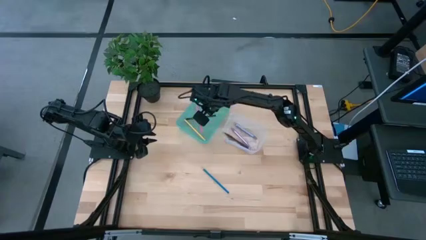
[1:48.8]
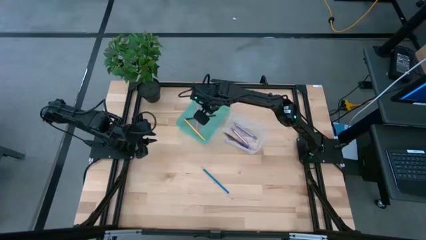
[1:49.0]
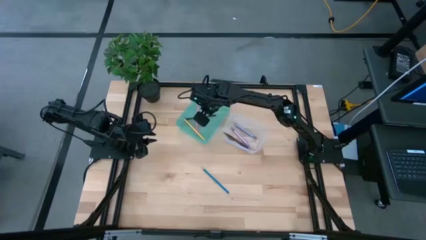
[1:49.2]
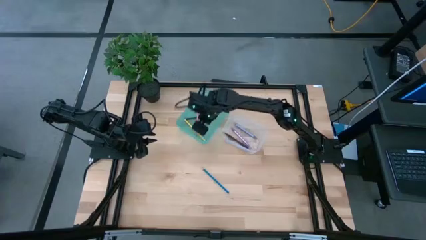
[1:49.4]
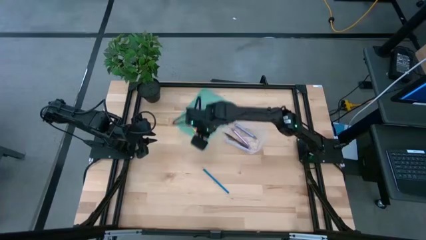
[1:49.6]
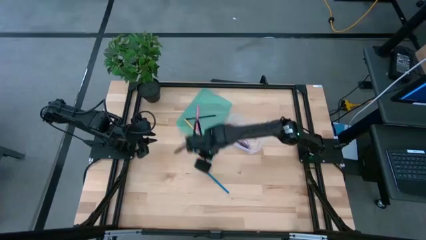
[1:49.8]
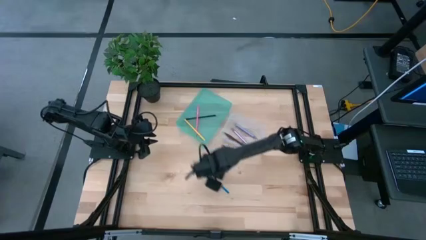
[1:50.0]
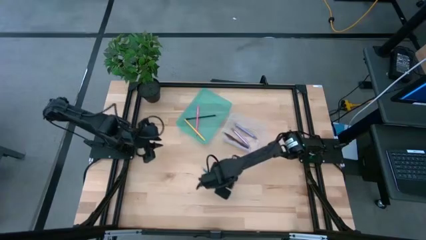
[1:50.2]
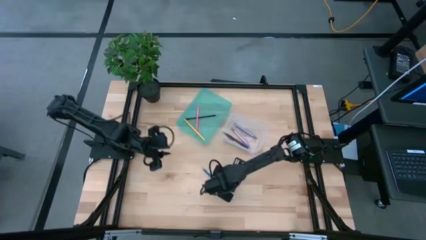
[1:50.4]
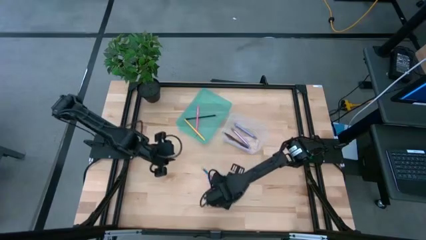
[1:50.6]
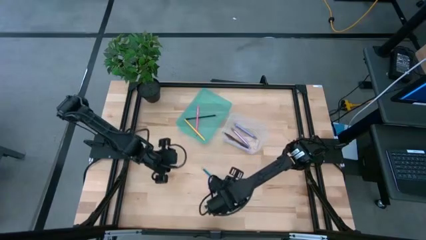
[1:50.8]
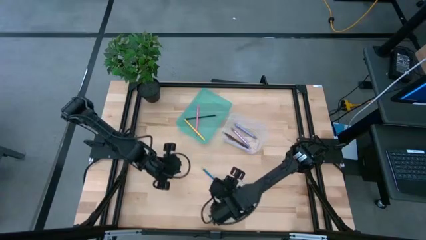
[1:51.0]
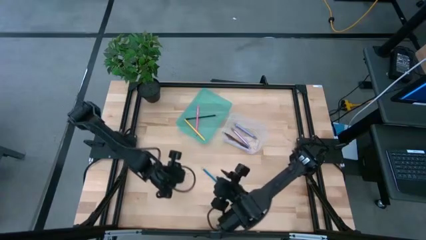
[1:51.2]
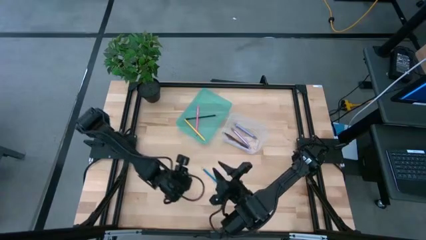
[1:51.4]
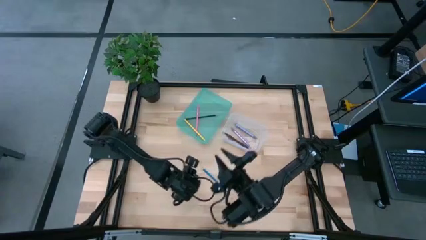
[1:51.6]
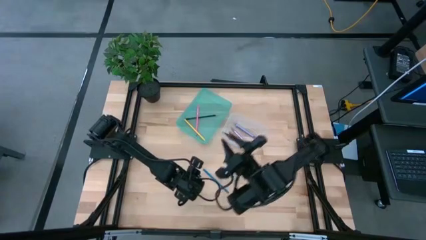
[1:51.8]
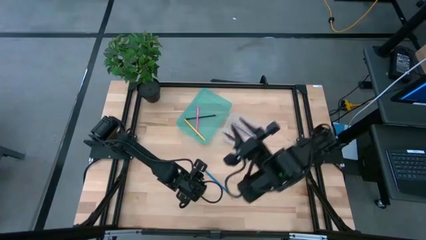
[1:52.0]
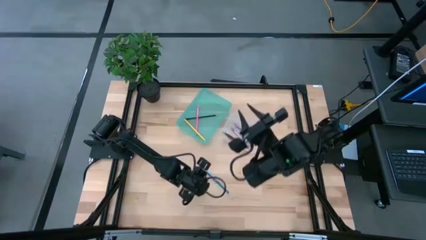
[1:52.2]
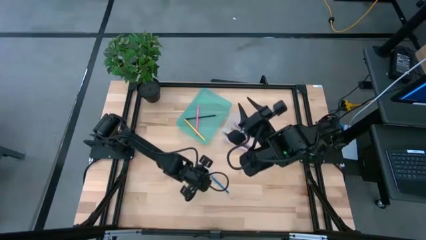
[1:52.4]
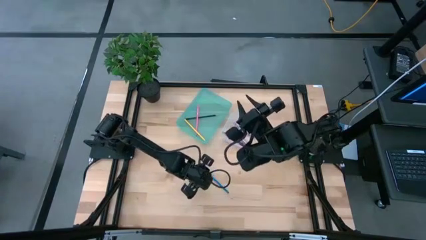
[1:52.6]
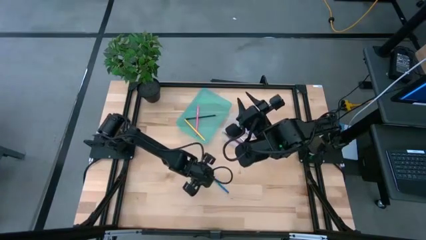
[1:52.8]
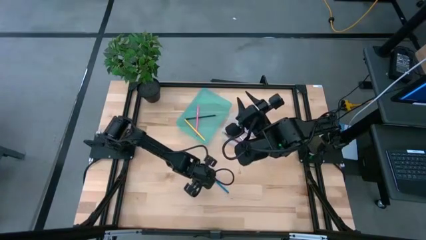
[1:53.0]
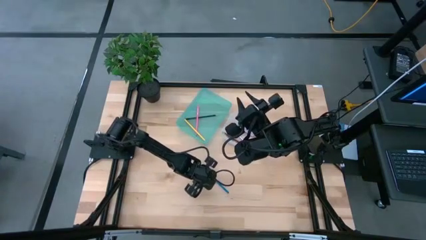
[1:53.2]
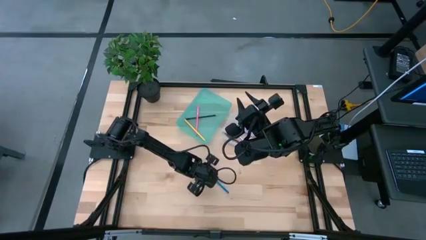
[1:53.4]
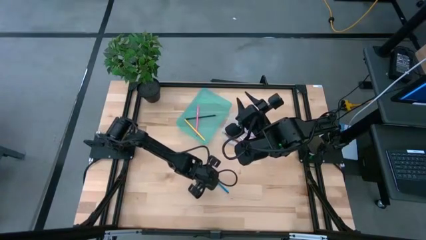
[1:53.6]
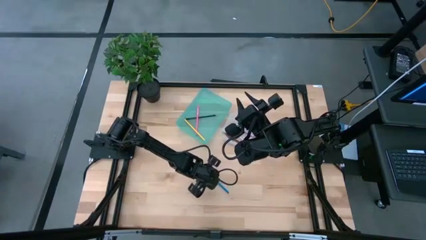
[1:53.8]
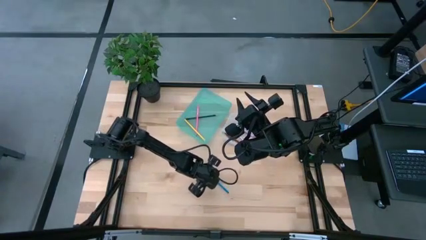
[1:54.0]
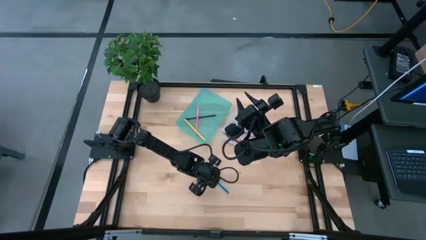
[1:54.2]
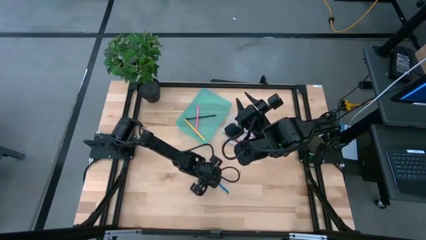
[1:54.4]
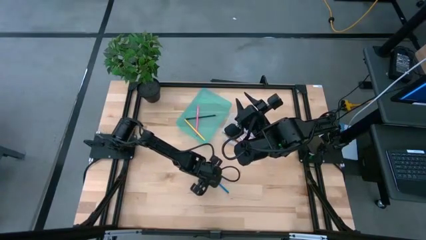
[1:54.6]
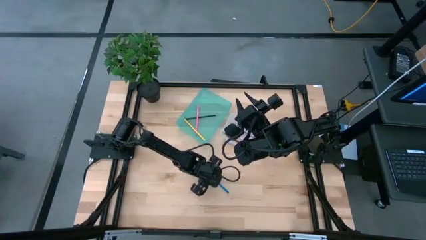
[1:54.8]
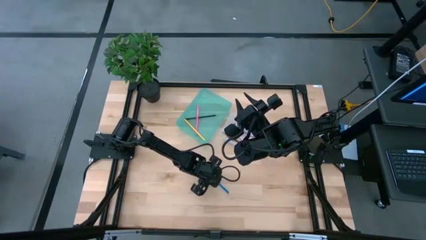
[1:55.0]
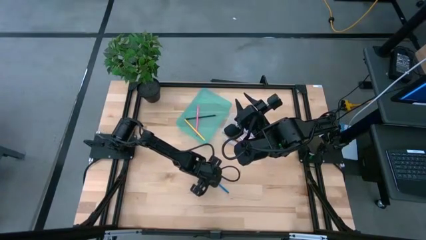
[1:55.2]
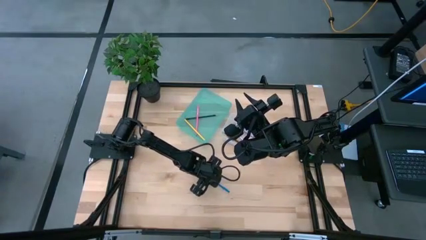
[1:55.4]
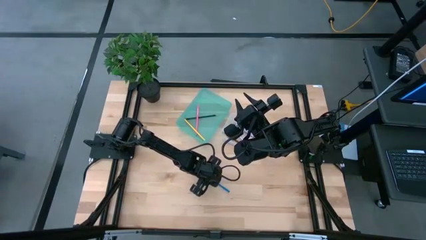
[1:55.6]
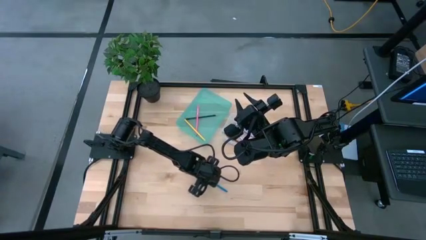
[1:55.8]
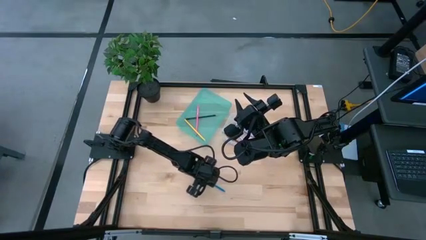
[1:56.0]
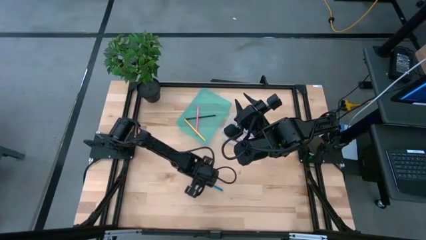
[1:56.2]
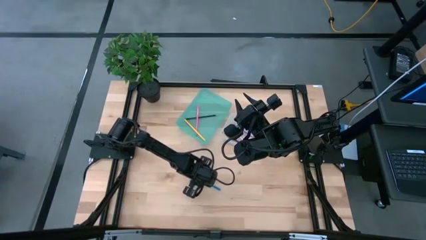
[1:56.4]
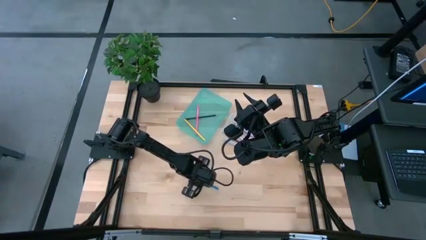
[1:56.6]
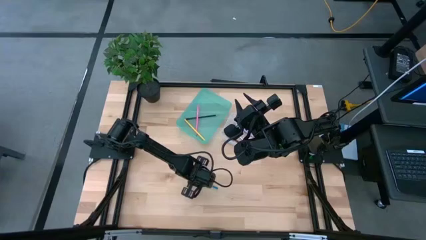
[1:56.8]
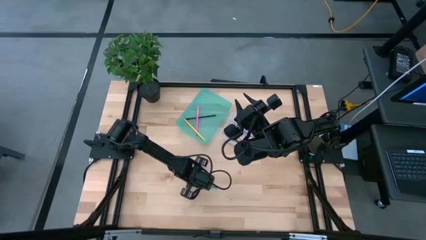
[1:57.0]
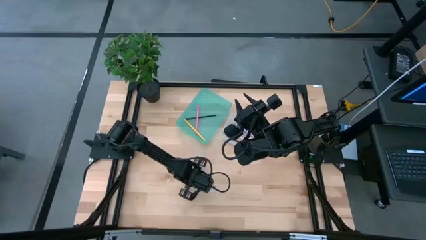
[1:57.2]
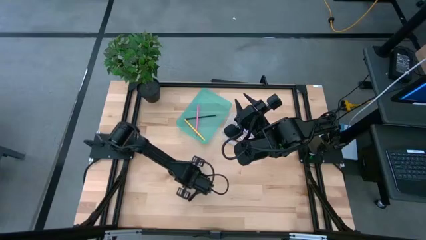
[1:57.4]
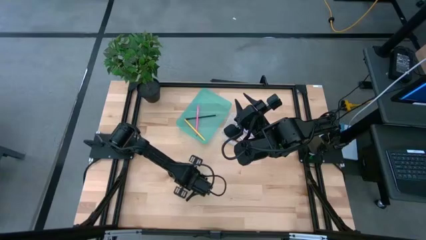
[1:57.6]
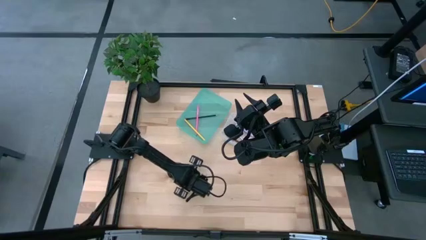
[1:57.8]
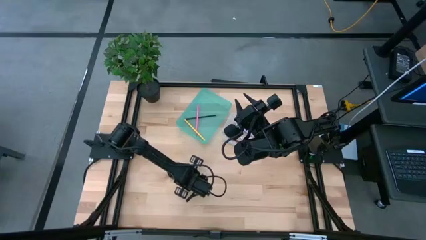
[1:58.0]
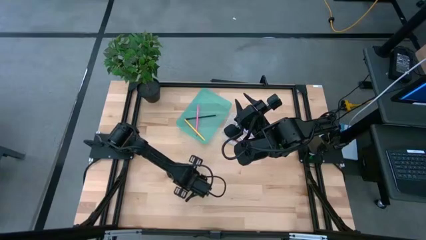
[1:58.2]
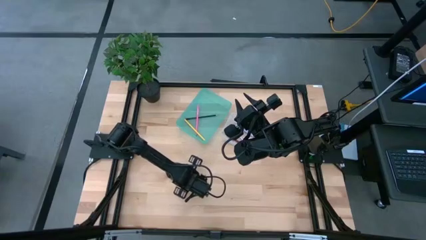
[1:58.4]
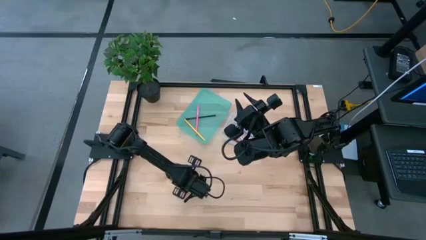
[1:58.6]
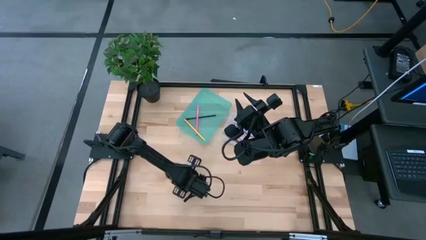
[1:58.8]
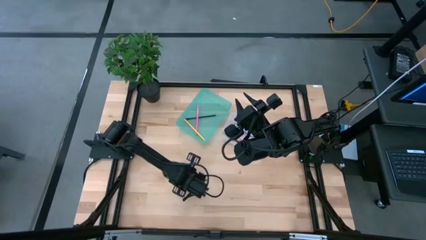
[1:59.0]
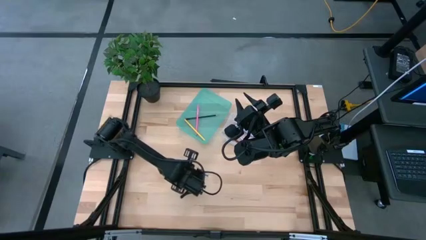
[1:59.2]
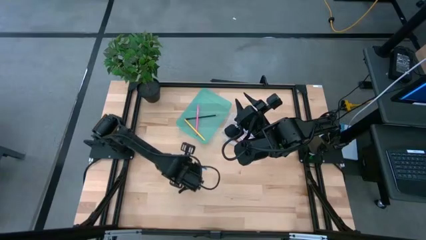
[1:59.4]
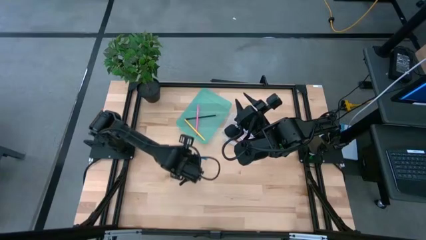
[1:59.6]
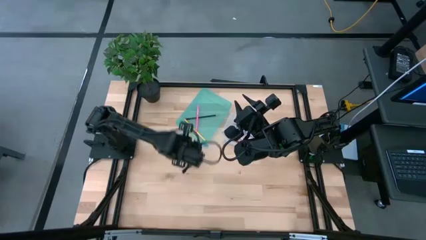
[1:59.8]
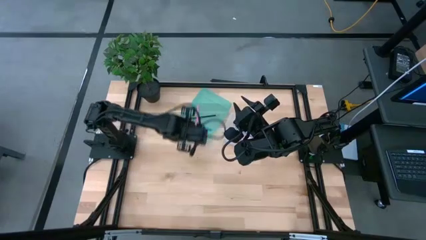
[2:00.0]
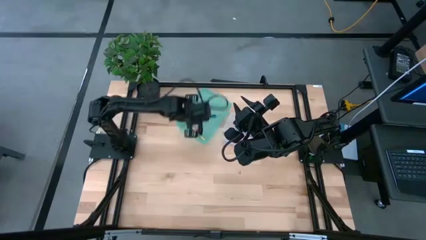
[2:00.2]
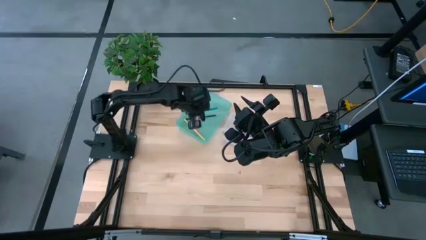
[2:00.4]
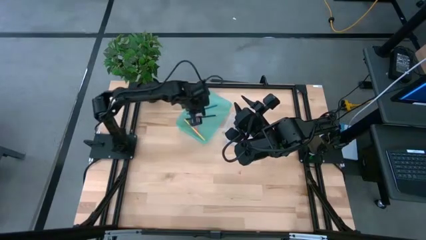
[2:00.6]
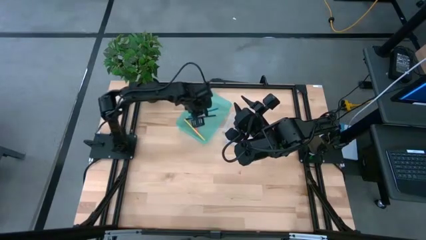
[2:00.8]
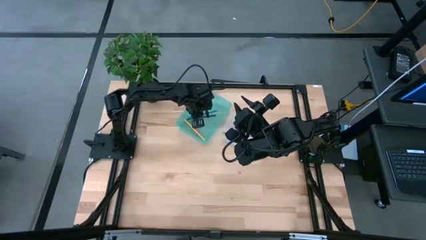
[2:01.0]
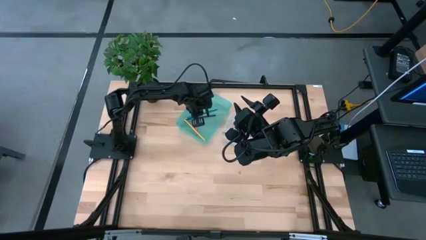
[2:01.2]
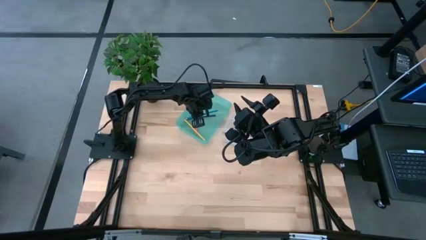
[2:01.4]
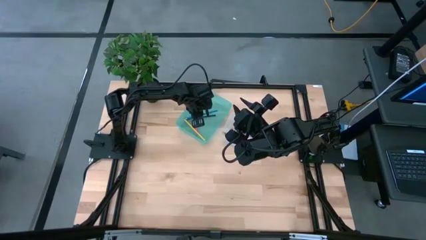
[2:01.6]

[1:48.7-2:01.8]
Task: Sort pens & pencils
Put the blue pencil into the blue bin

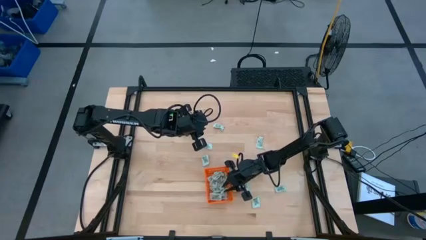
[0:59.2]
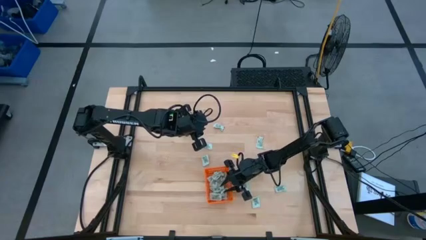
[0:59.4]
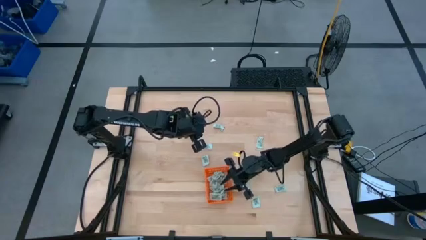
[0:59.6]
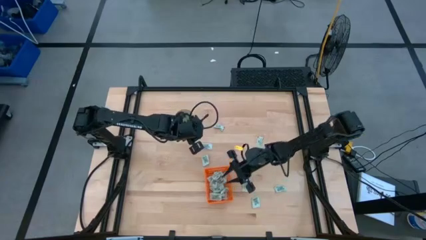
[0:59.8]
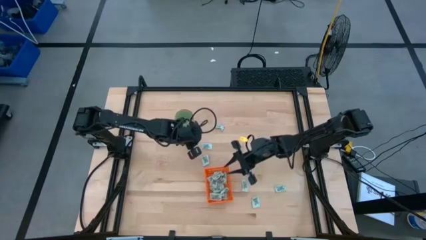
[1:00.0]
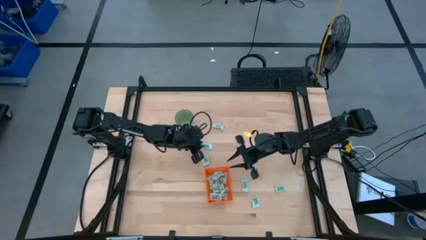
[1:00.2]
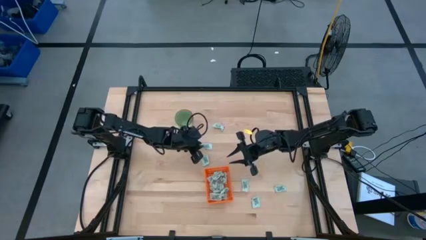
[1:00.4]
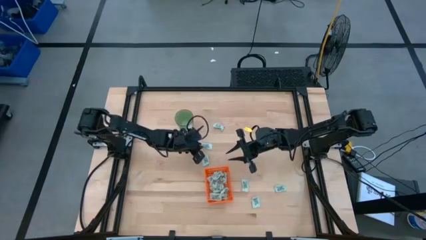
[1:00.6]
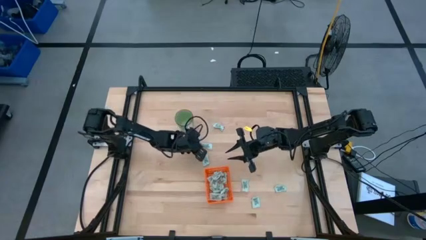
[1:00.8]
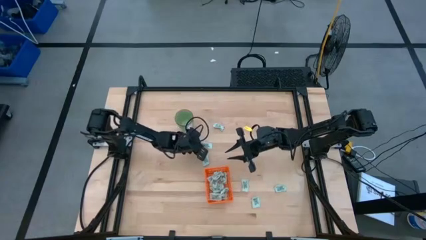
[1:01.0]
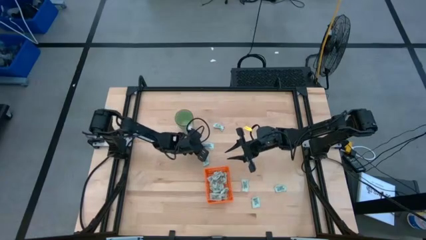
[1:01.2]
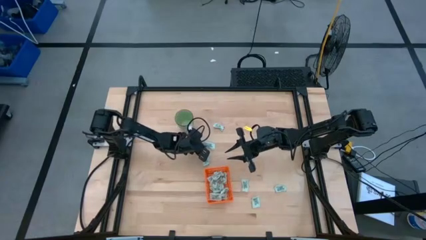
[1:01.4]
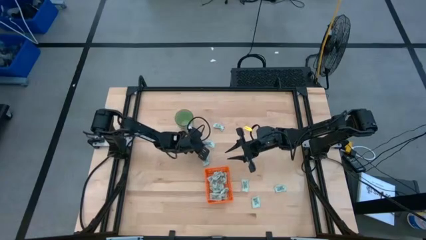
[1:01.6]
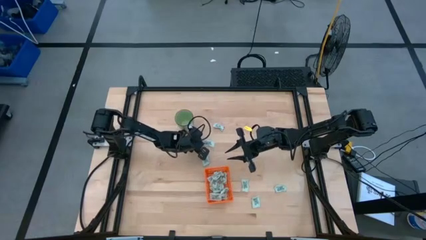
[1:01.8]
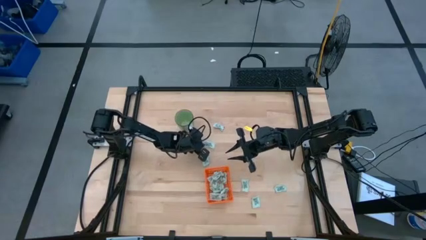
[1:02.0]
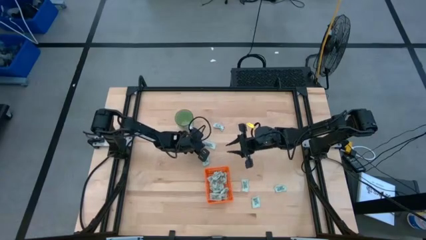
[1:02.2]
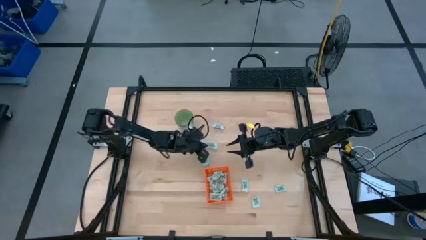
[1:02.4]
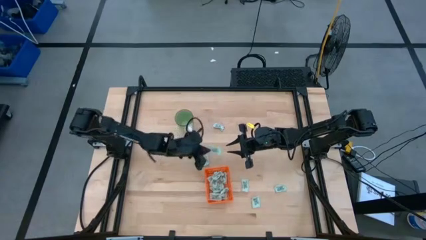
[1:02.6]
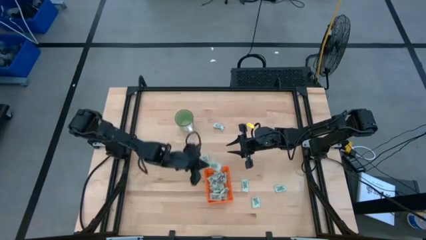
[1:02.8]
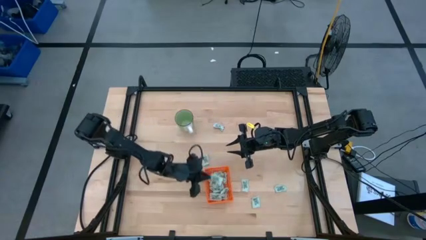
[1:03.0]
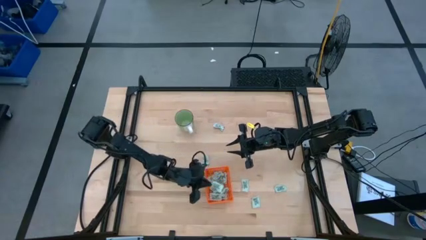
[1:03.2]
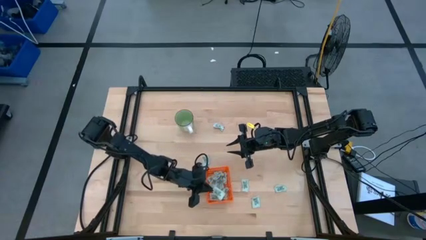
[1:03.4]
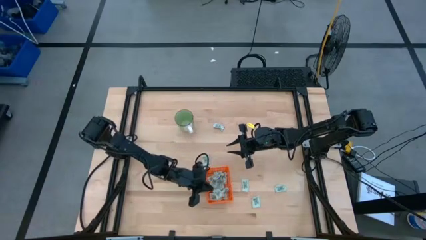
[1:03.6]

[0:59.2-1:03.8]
Task: Pick and place Stevia / Truvia into bins
Put the stevia packet into the orange basket
